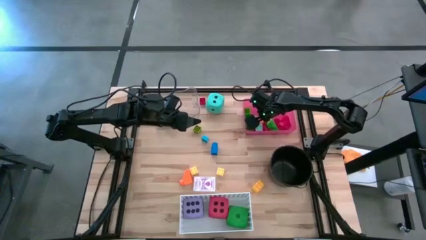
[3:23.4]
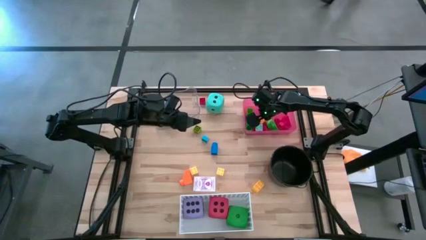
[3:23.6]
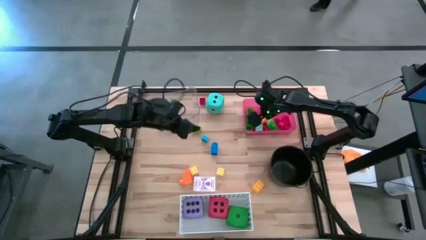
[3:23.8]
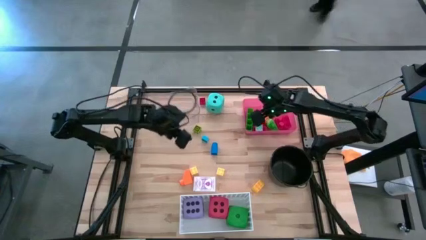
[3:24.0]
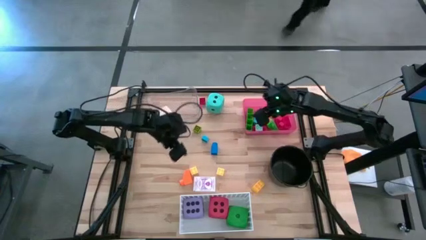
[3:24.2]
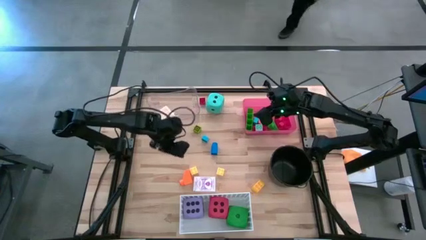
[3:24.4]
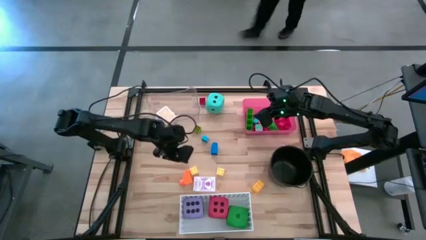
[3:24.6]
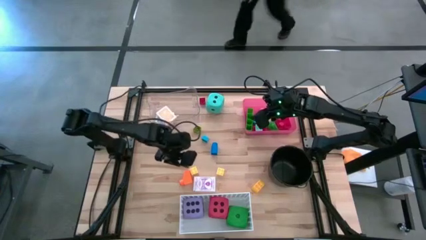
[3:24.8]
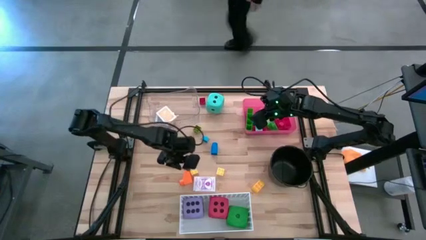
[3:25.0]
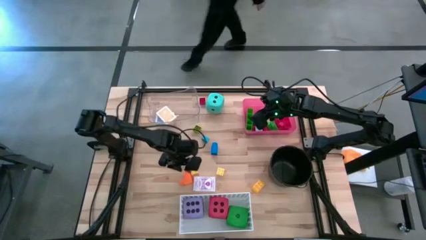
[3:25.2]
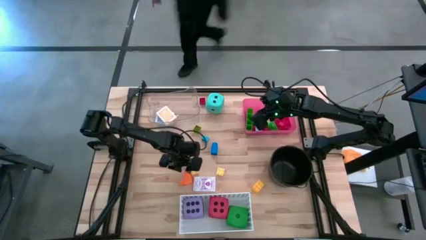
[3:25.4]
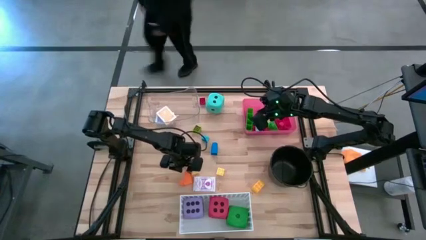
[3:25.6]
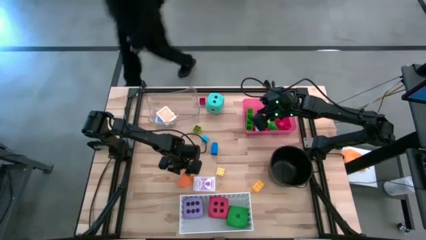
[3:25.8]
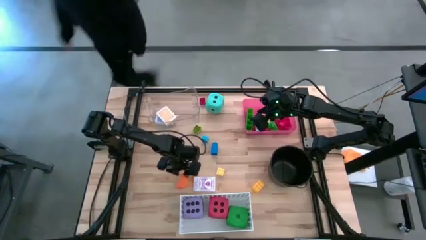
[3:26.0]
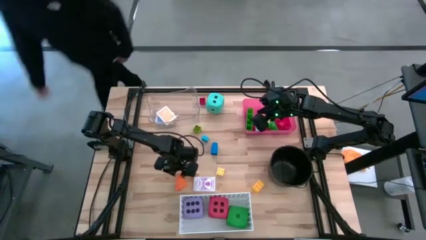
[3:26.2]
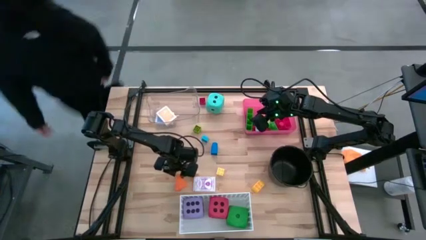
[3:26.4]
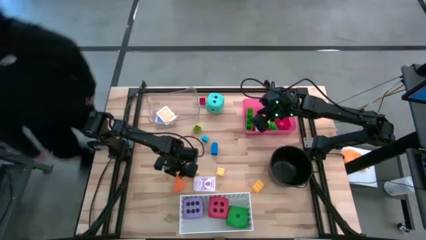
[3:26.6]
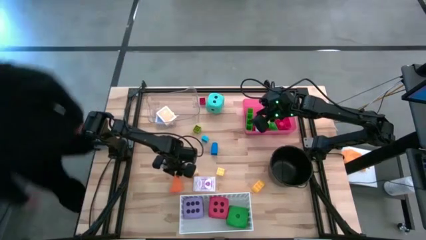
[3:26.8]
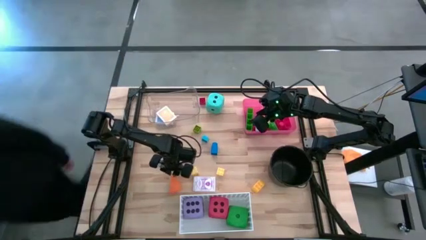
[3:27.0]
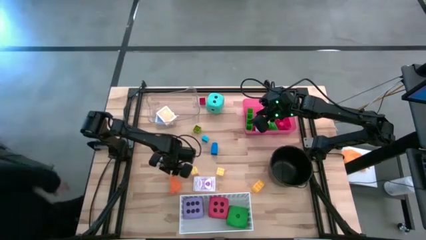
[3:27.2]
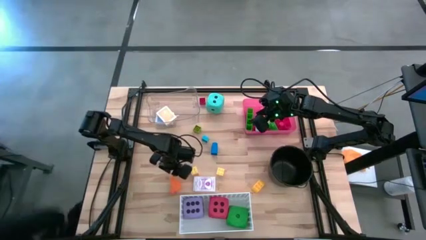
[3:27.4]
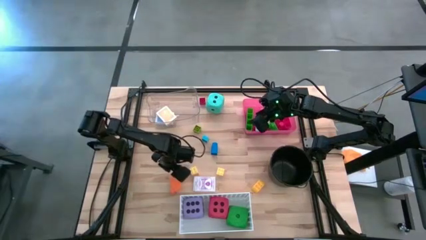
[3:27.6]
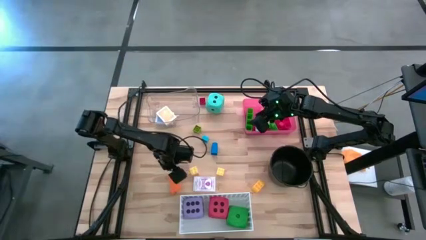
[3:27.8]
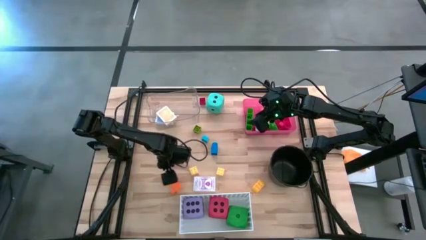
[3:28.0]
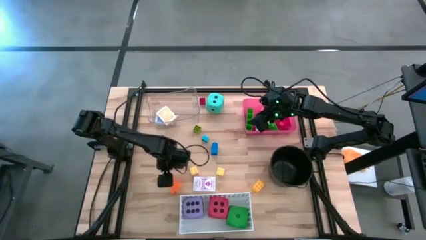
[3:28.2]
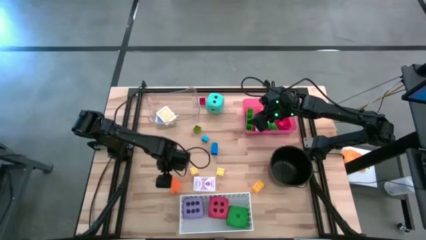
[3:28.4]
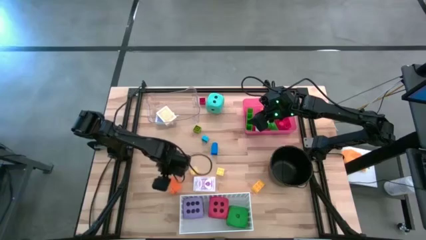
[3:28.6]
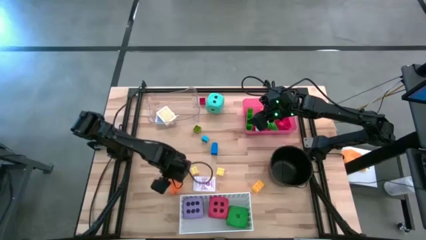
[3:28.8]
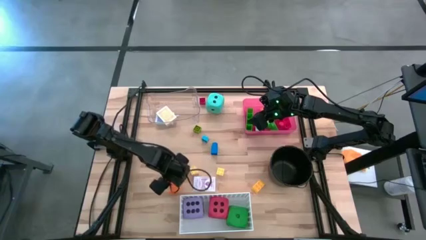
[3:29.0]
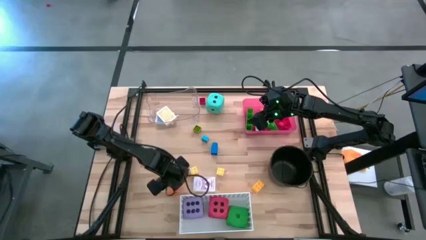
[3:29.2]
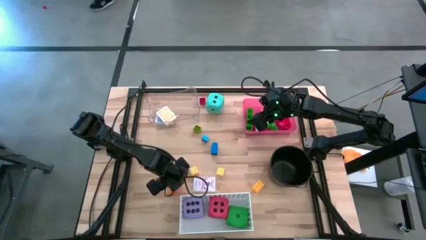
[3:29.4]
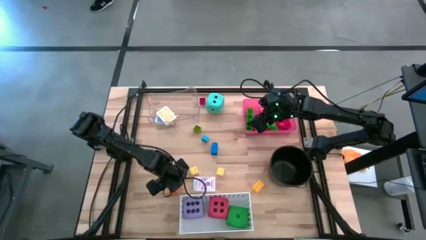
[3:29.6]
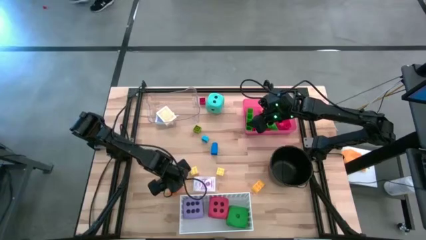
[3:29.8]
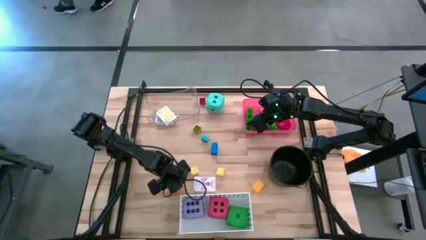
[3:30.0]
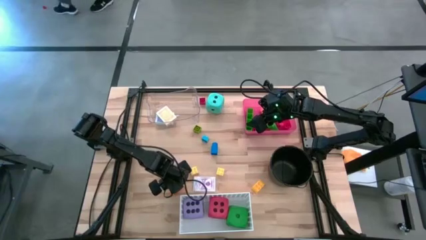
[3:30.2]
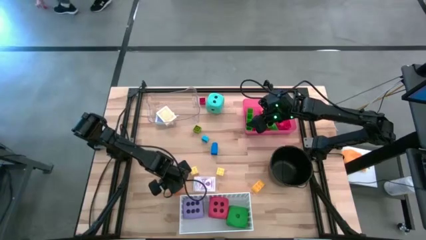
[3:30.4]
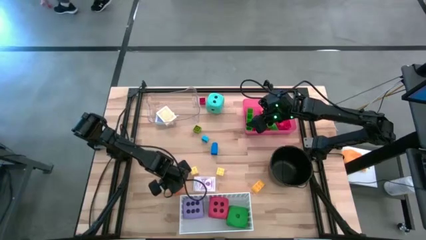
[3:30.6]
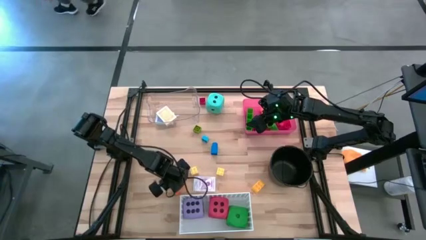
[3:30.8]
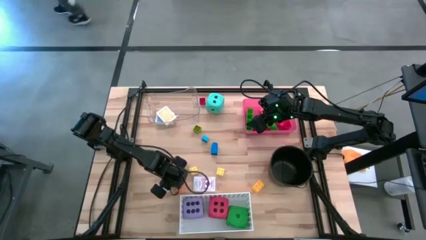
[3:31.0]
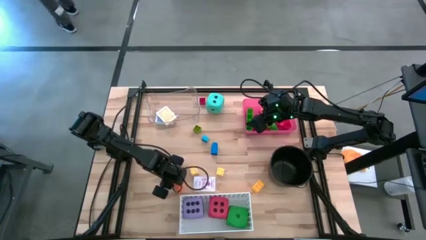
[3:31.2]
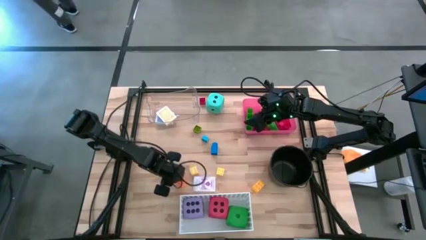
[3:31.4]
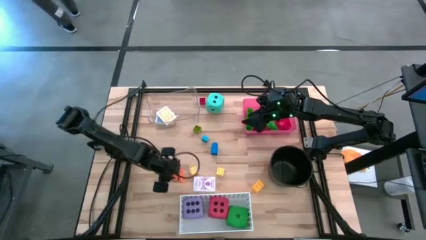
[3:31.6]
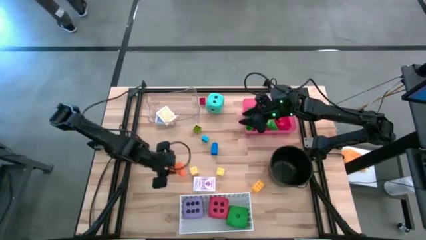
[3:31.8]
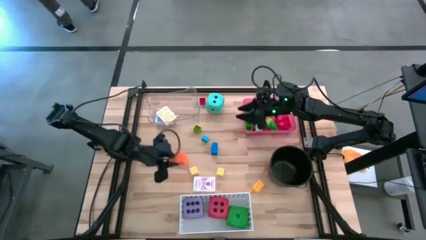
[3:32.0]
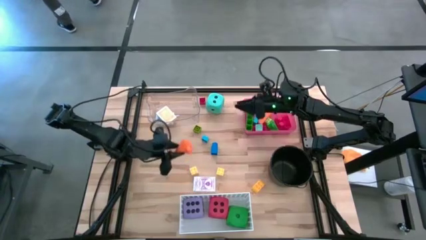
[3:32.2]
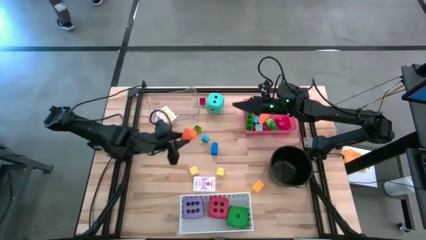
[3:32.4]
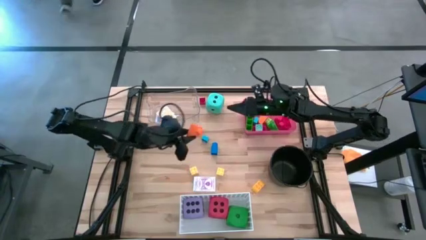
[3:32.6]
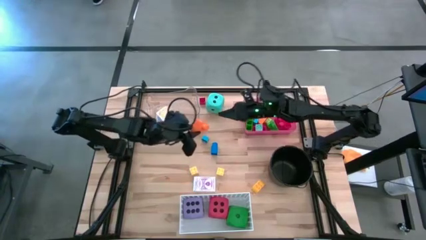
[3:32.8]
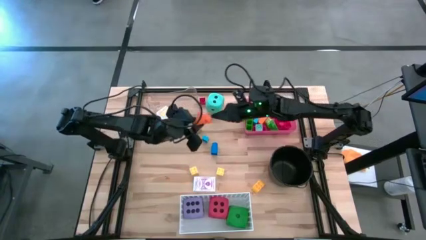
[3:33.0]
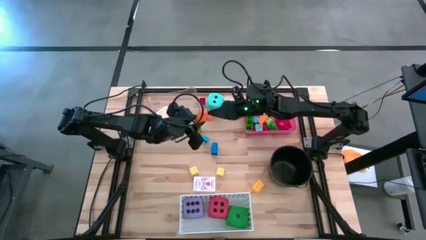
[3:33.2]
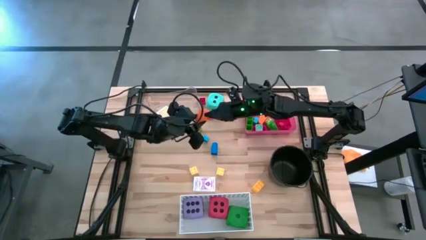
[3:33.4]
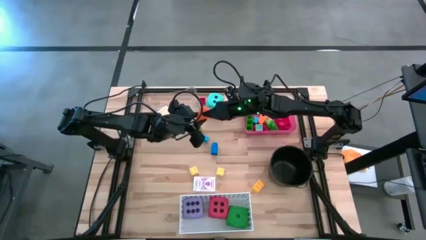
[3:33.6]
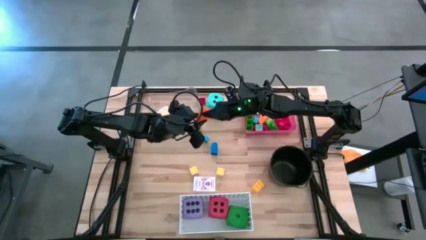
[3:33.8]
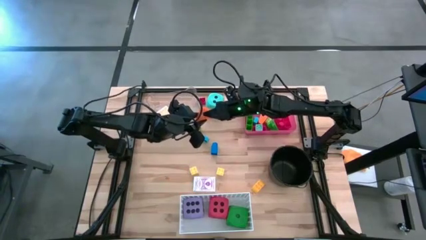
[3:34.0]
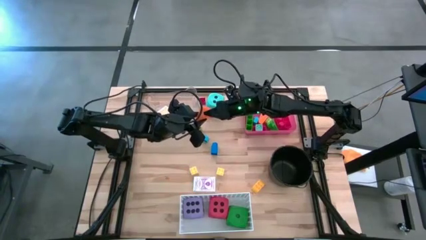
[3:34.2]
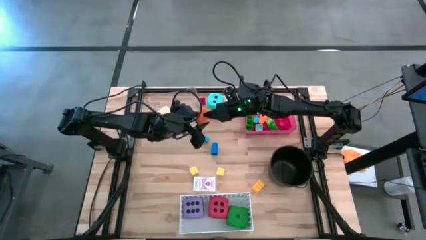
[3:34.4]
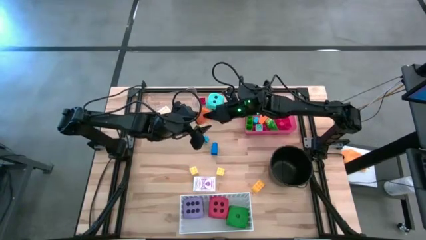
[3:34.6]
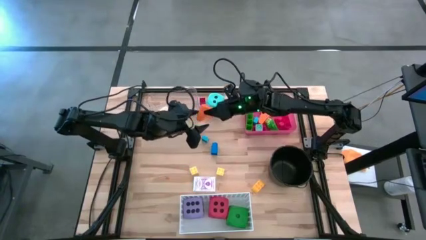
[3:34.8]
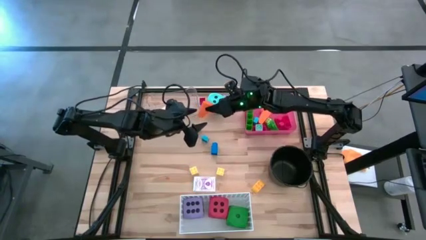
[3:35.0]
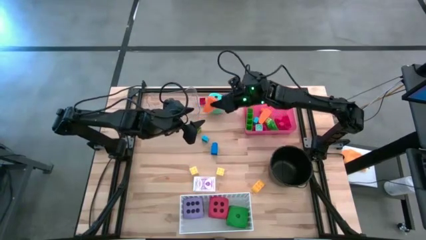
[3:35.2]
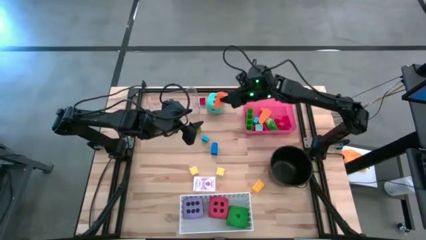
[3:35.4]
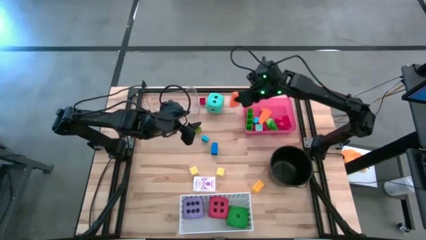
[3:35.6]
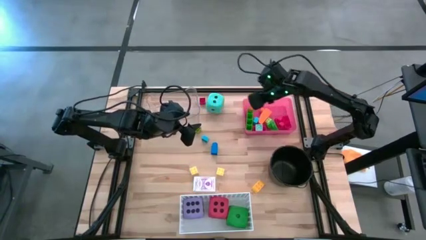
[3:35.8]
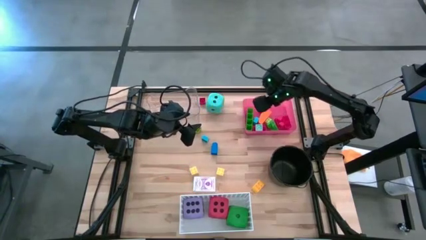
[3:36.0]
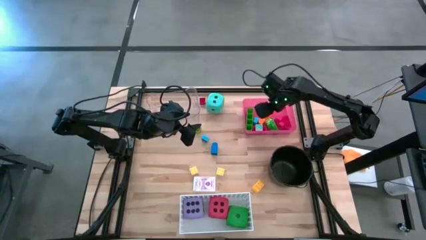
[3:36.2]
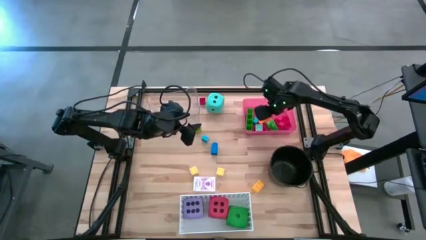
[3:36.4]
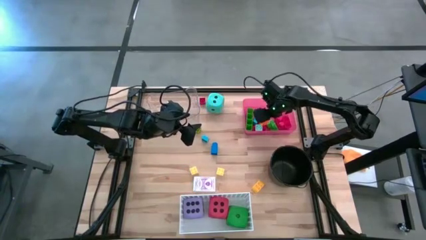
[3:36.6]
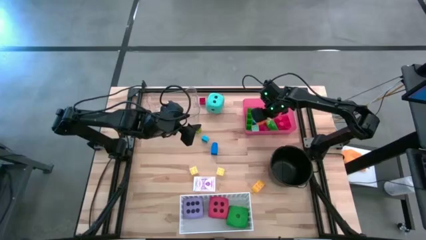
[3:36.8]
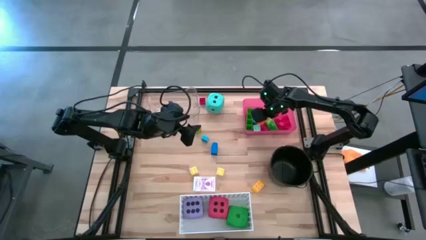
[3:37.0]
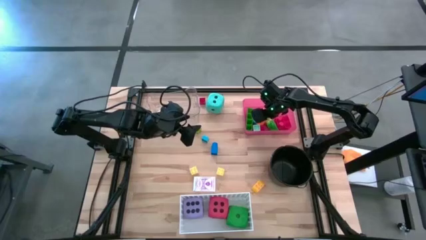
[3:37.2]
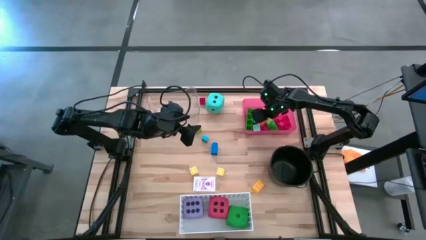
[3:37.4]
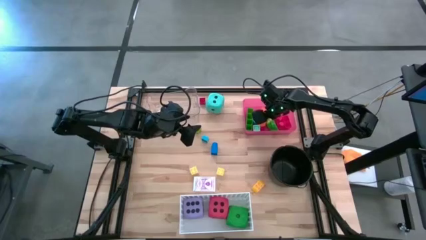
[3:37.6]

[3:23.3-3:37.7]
Task: Pick & Place Toys
Put the orange game piece into the red bin

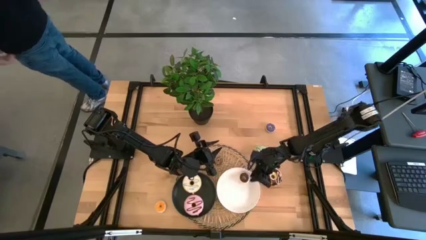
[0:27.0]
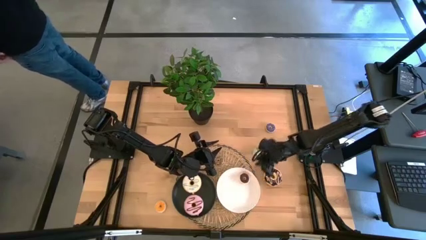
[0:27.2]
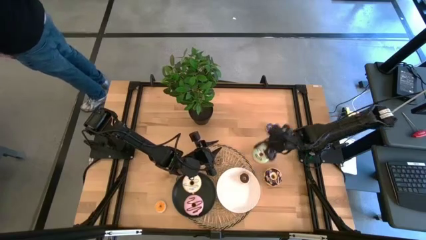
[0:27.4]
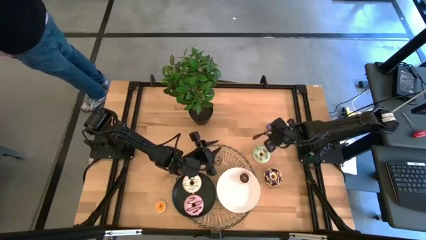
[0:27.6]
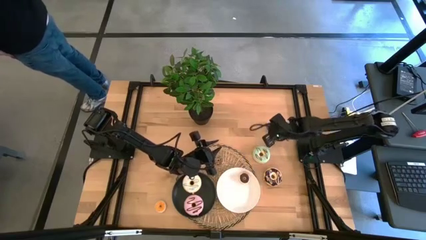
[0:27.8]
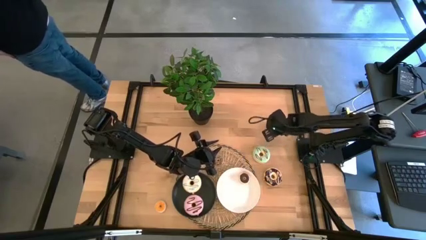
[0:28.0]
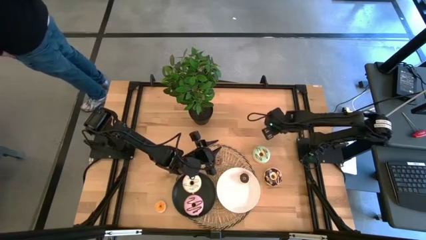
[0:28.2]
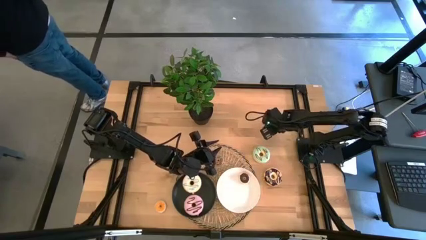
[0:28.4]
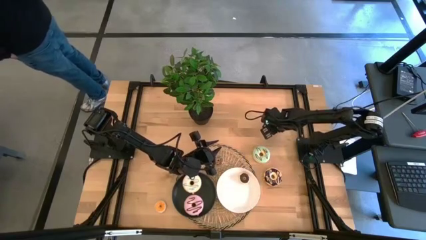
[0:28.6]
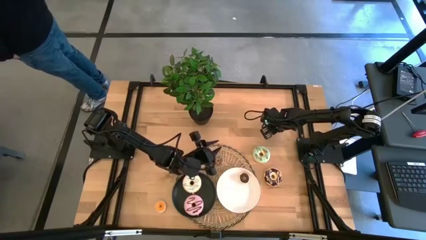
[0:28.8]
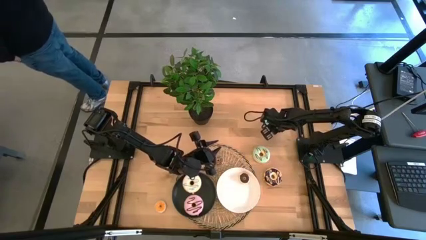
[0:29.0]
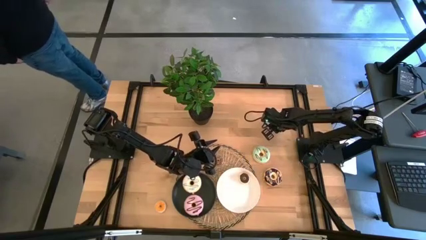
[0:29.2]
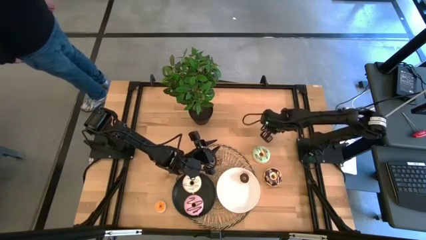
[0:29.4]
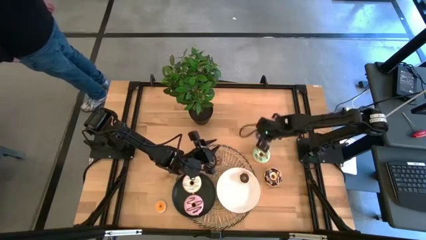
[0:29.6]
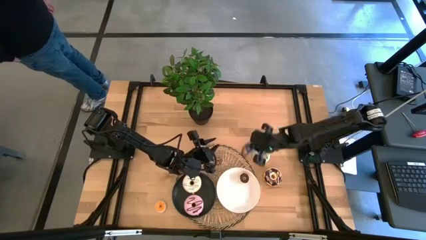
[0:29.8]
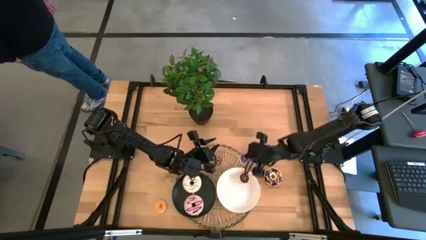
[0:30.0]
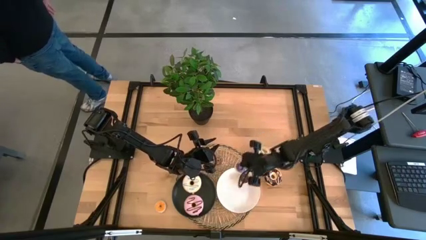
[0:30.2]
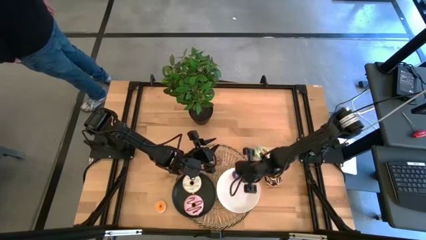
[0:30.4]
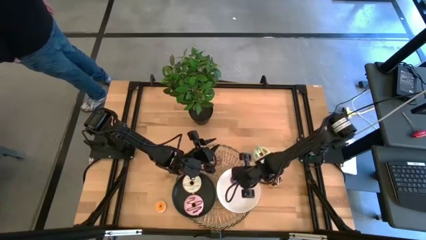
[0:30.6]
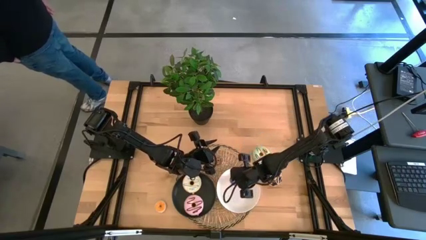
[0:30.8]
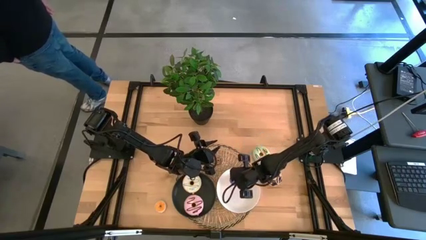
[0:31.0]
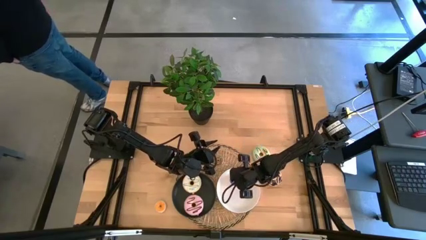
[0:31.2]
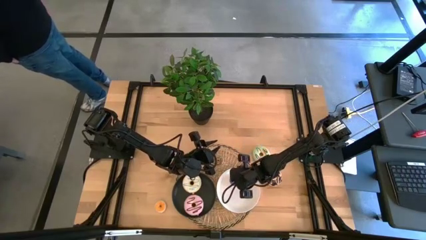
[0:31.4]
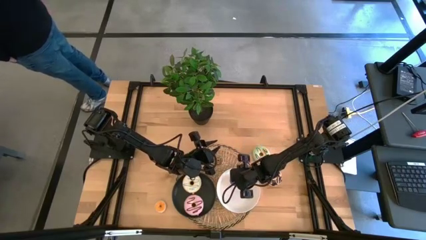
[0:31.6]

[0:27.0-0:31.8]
Task: Pick & Place donuts
Put the small blue donut on the white plate
